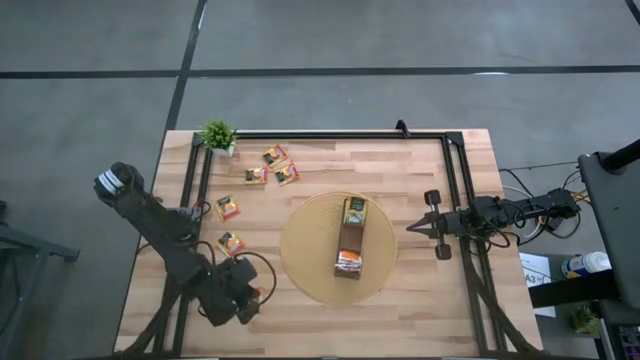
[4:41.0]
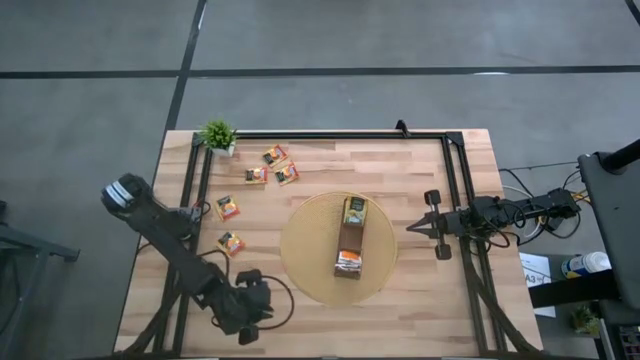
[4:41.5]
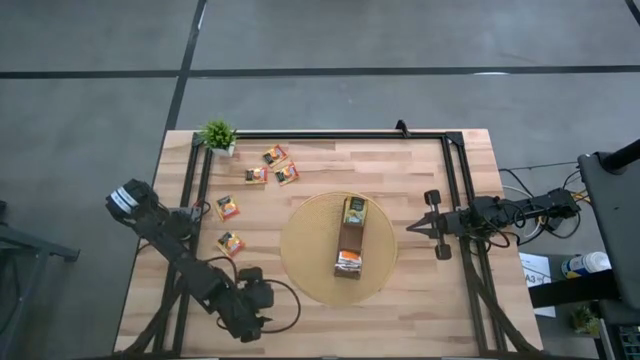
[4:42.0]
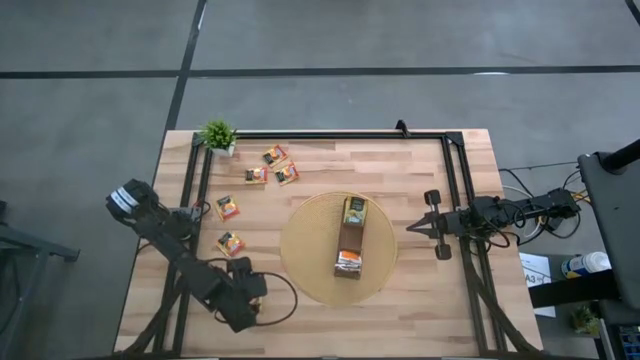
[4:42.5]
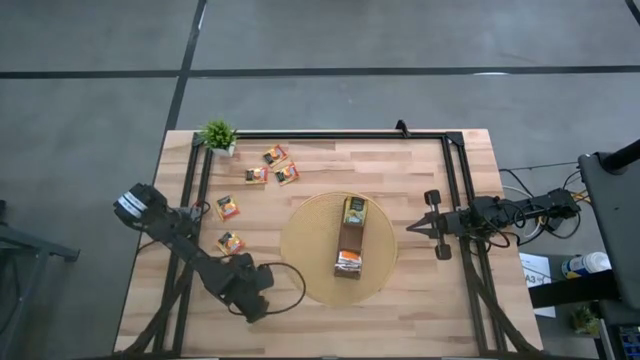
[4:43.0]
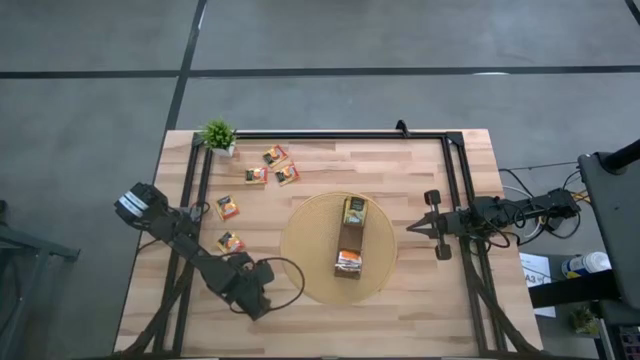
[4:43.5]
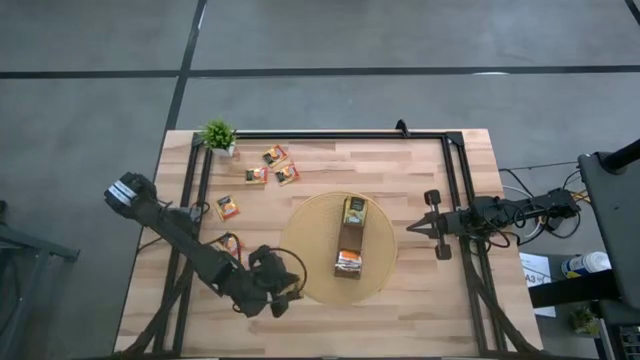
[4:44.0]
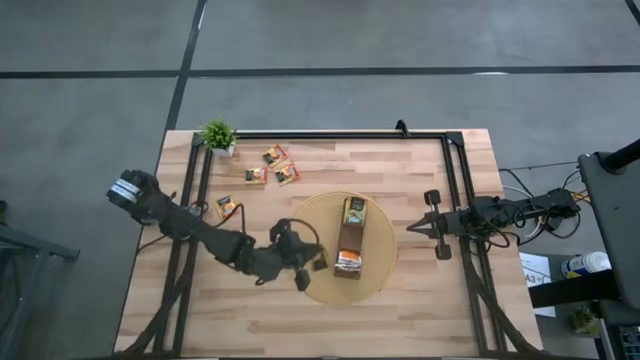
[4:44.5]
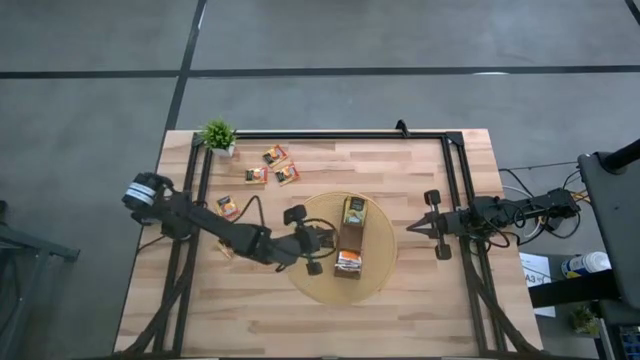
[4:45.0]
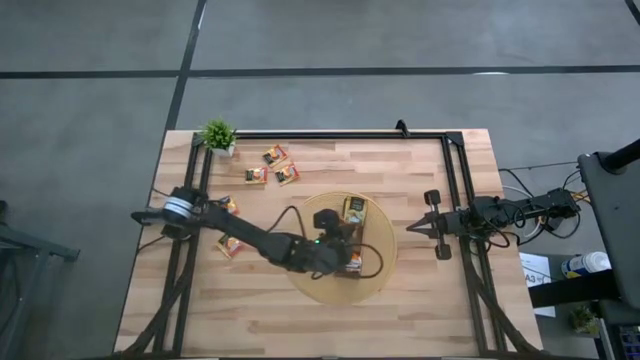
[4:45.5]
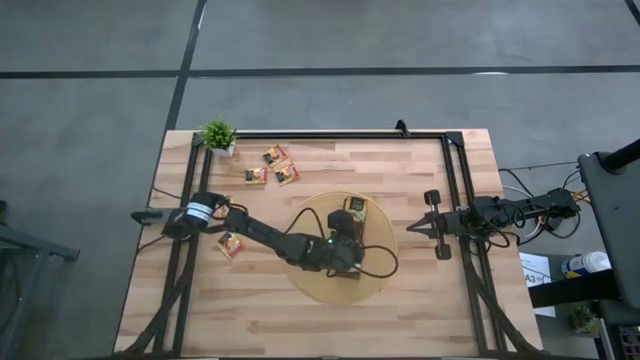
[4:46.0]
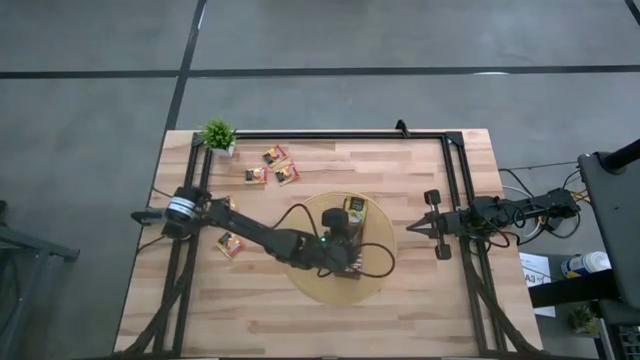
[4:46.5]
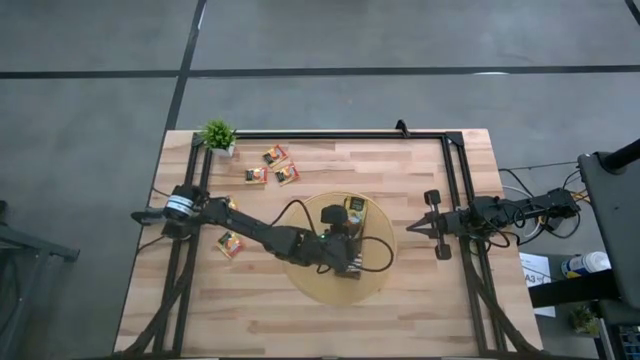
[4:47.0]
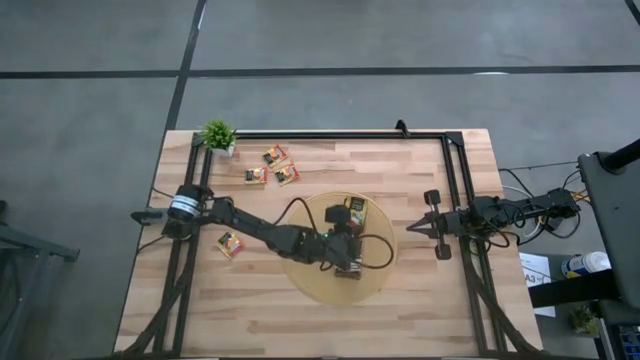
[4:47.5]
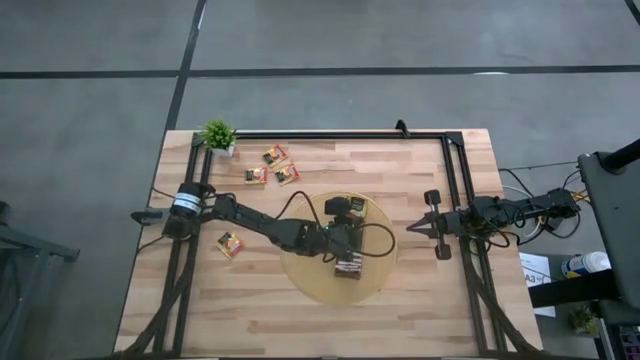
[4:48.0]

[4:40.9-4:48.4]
Task: Pick & Place Tea
Put the orange tea bag into the middle section of the wooden organizer

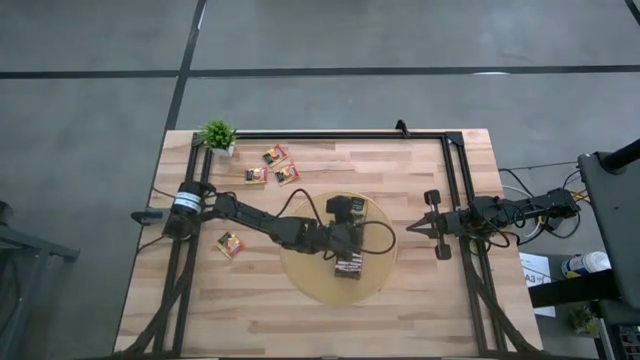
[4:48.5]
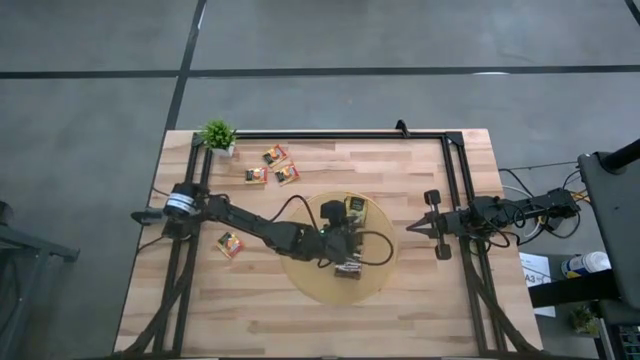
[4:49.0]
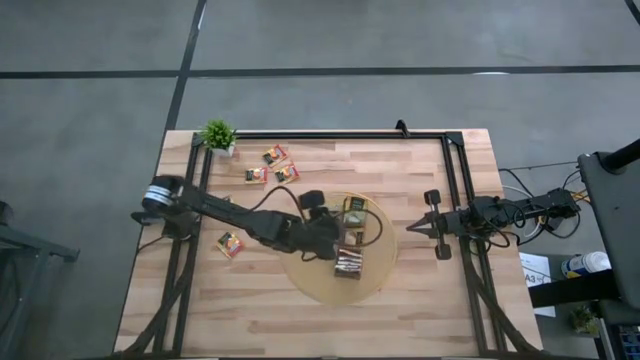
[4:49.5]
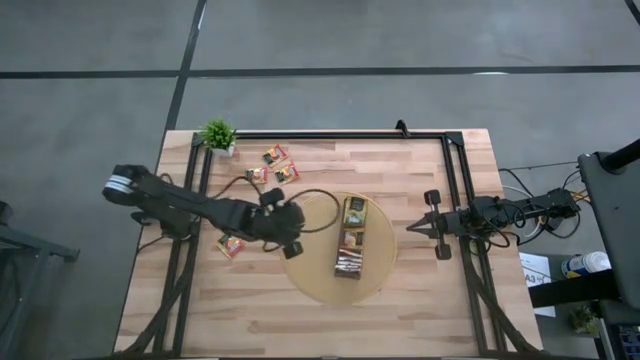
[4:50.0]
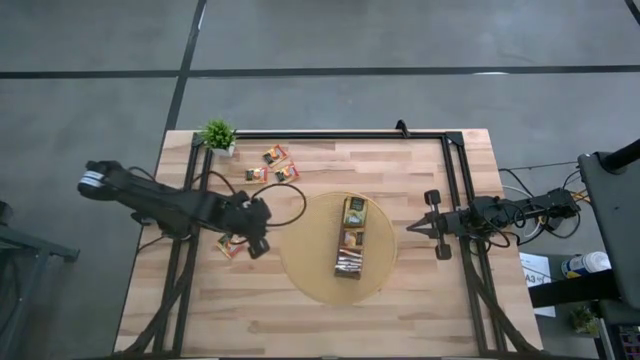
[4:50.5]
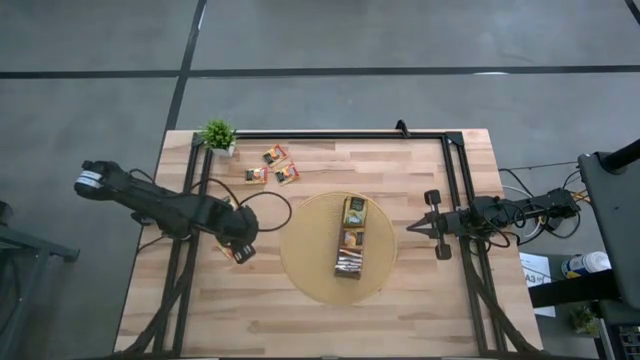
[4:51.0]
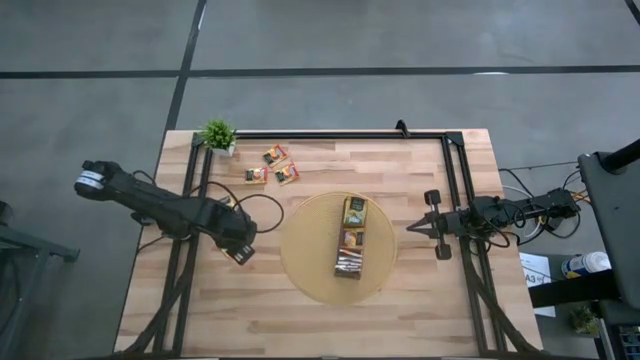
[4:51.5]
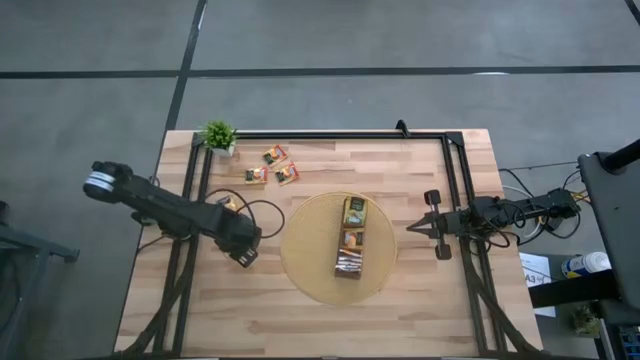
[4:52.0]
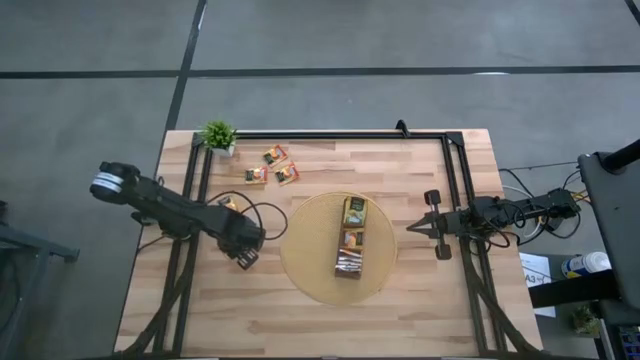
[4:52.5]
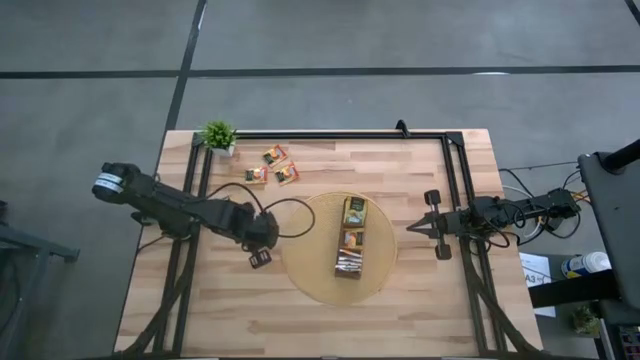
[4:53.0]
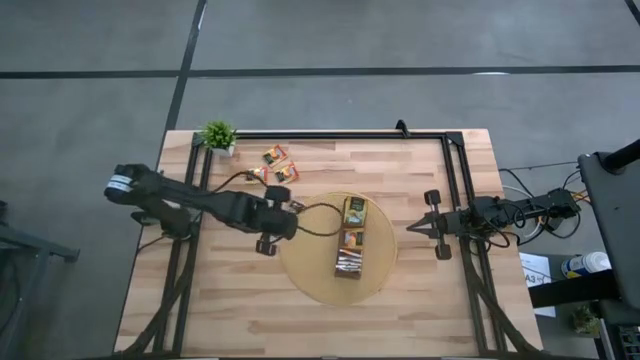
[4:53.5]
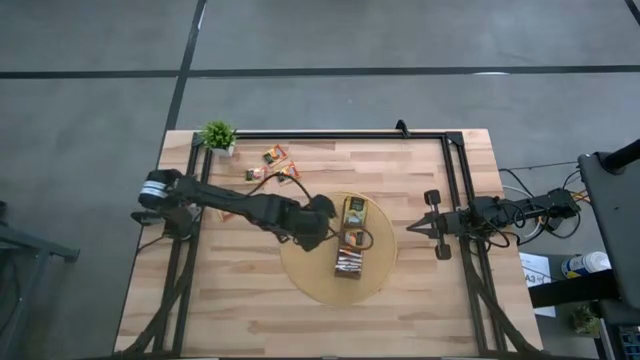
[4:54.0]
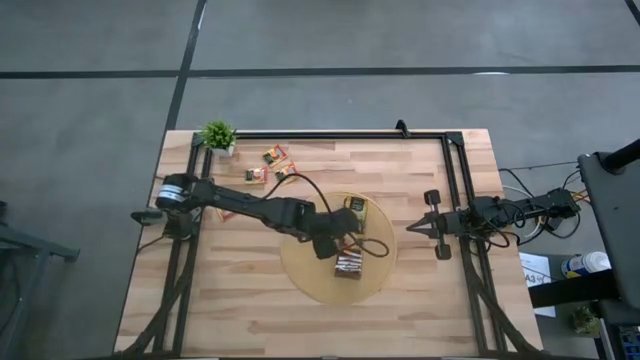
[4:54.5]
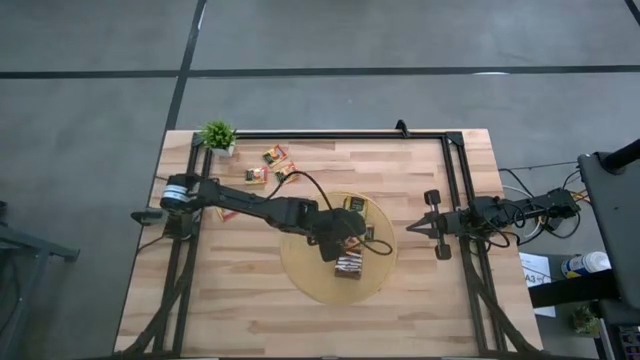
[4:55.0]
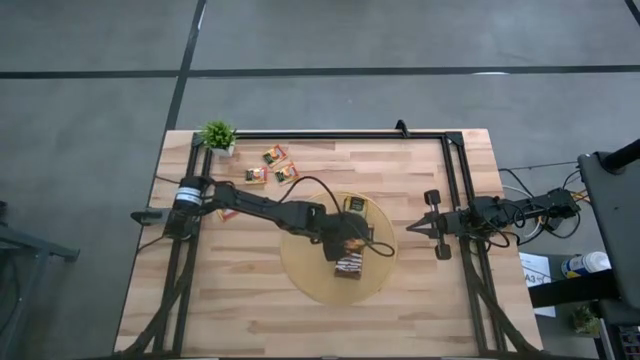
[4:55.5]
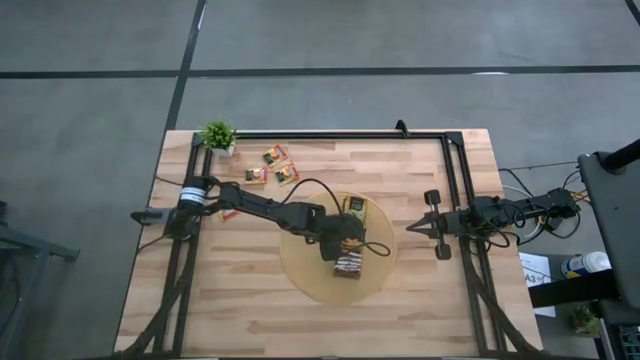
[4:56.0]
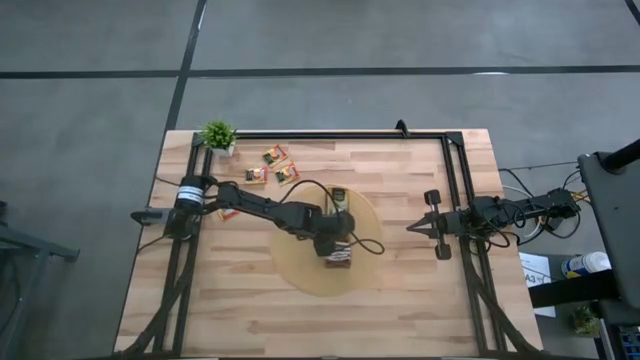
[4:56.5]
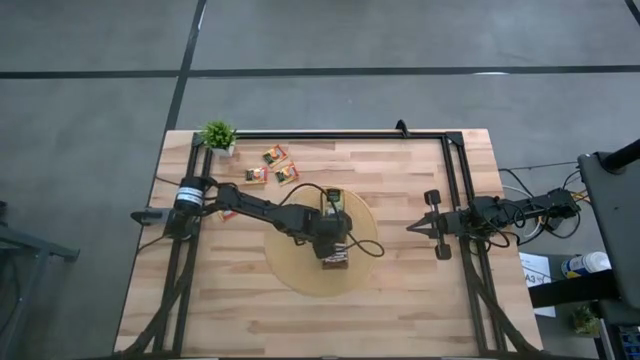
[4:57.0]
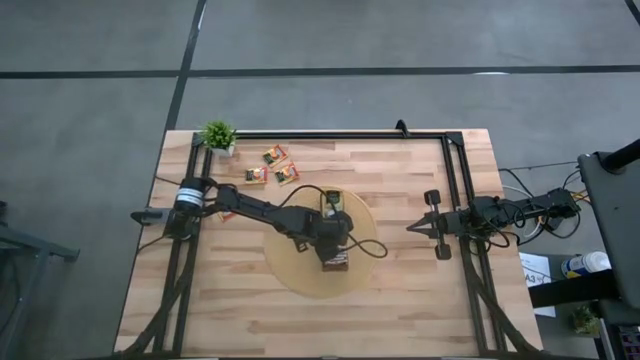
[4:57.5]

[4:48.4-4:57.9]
Put the orange tea bag into the middle section of the wooden organizer

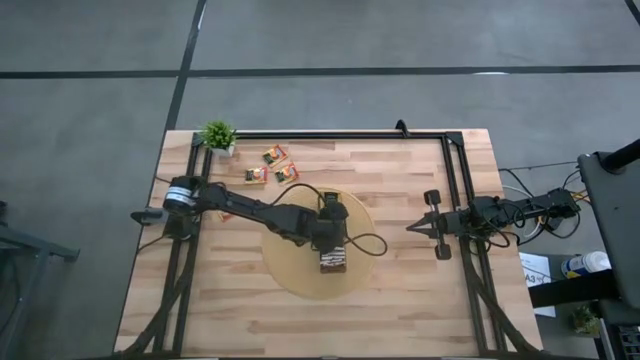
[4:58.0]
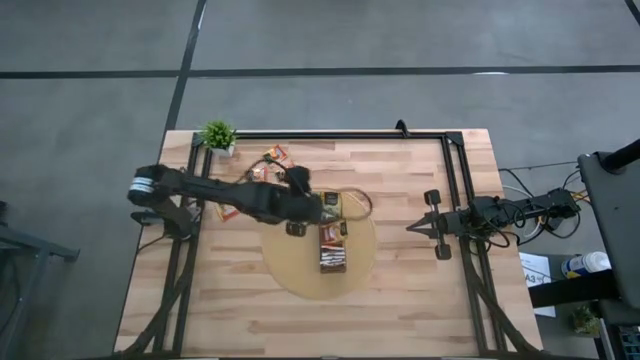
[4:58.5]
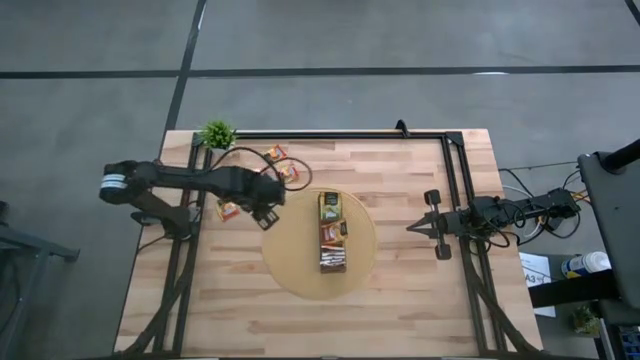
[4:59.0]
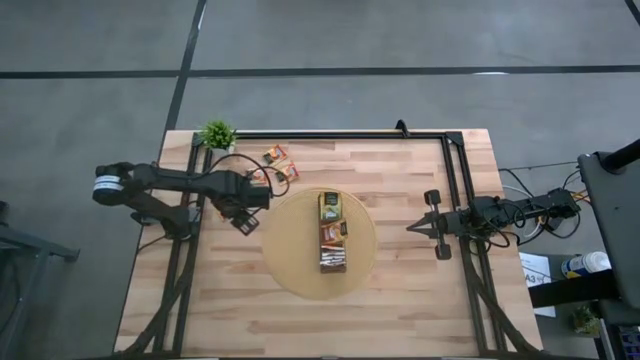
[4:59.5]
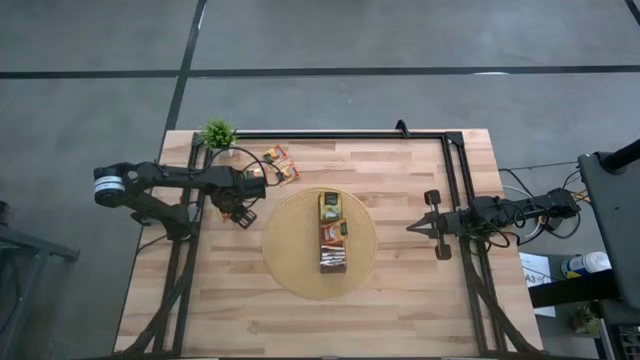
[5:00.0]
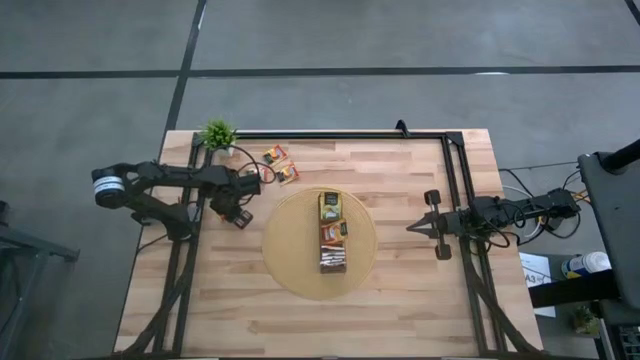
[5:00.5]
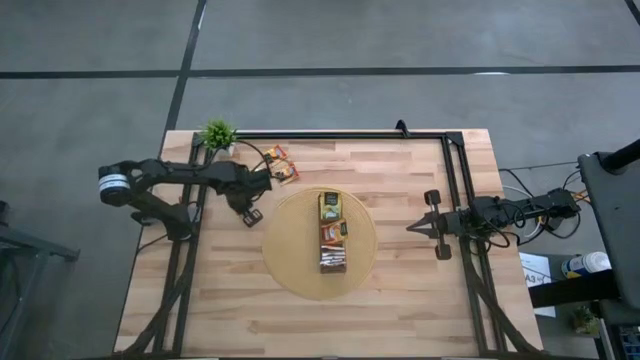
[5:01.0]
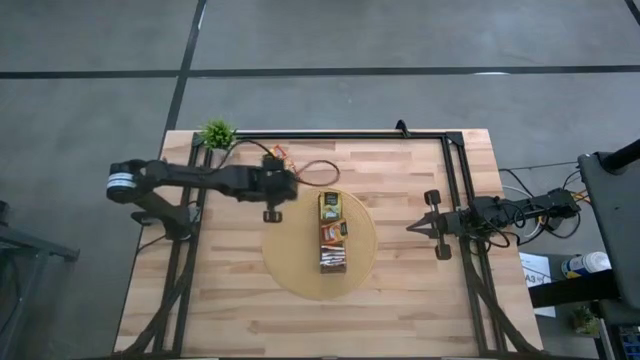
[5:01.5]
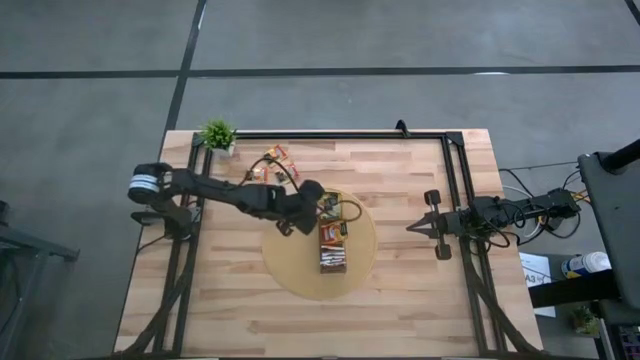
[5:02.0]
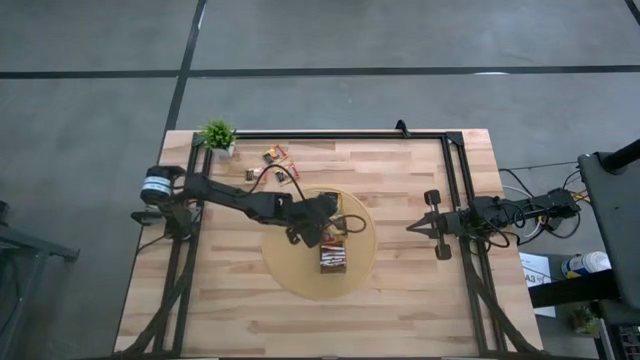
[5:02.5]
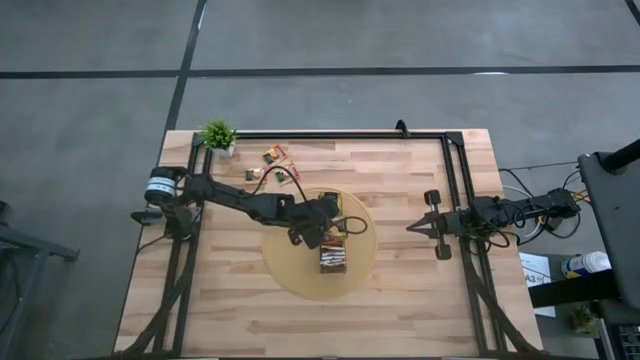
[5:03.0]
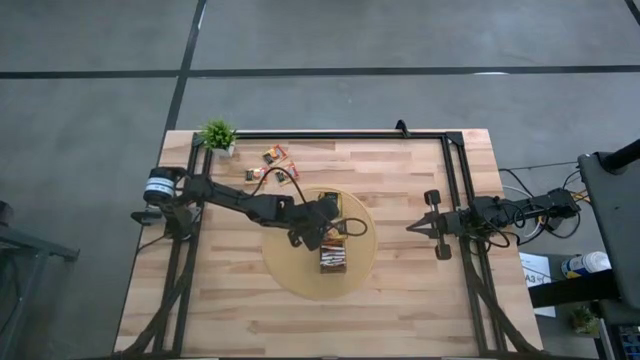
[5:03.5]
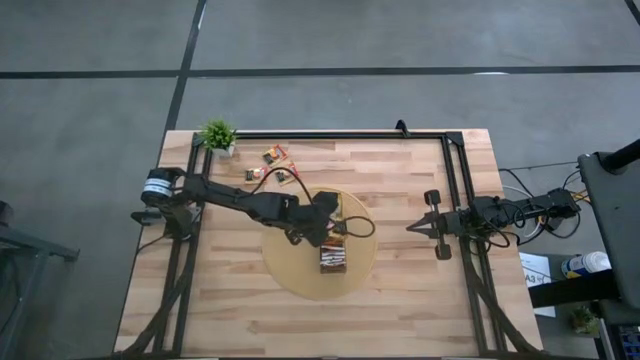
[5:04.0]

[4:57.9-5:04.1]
Put the orange tea bag into the middle section of the wooden organizer
